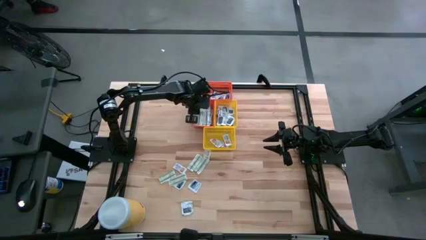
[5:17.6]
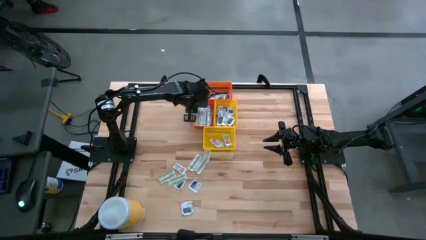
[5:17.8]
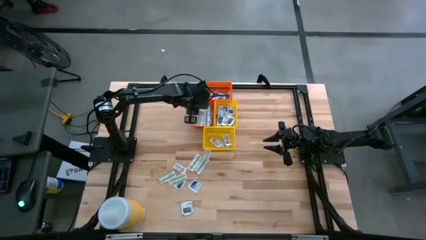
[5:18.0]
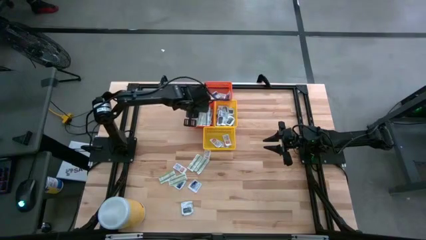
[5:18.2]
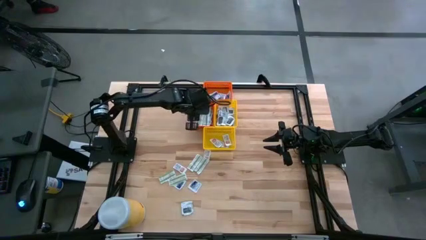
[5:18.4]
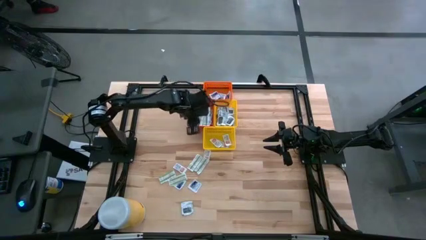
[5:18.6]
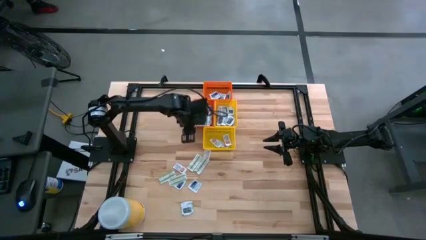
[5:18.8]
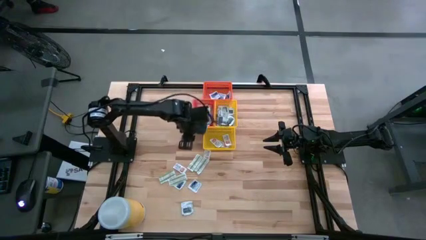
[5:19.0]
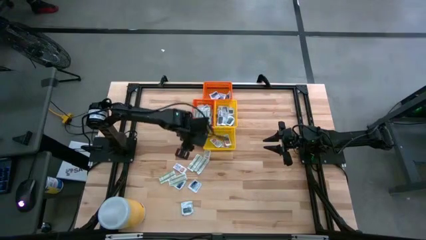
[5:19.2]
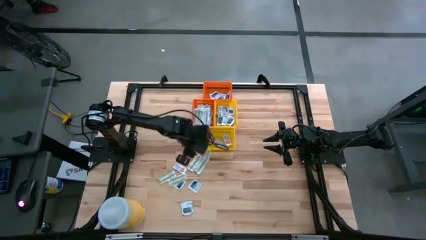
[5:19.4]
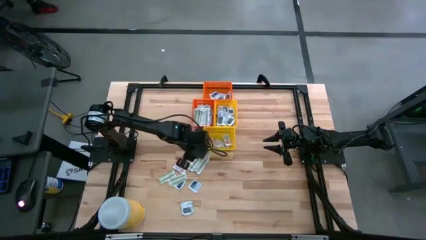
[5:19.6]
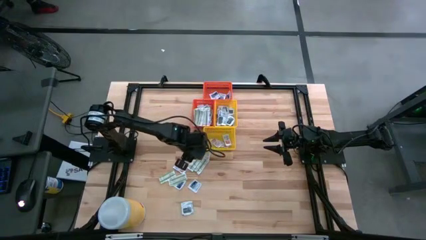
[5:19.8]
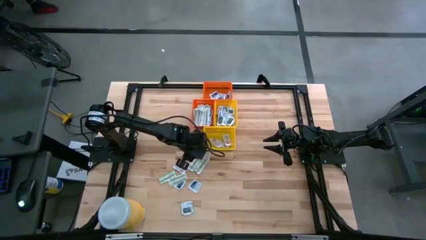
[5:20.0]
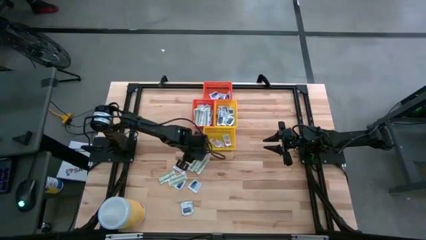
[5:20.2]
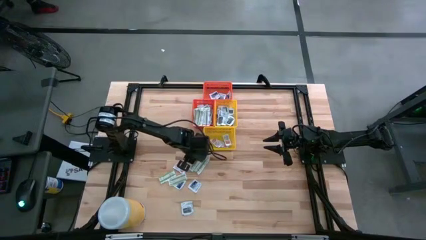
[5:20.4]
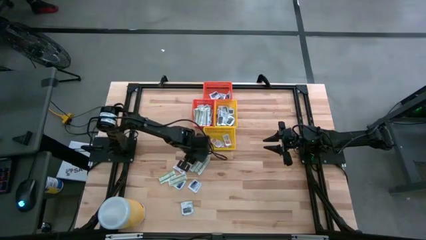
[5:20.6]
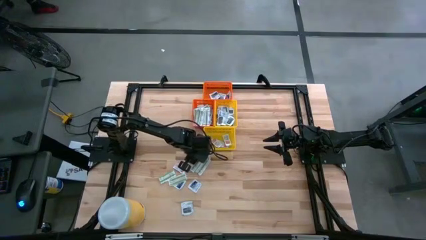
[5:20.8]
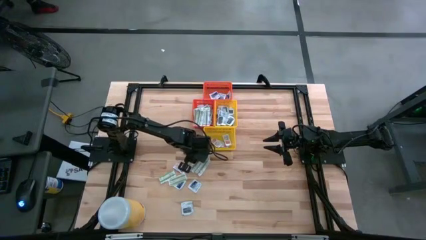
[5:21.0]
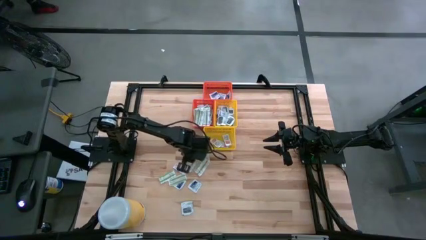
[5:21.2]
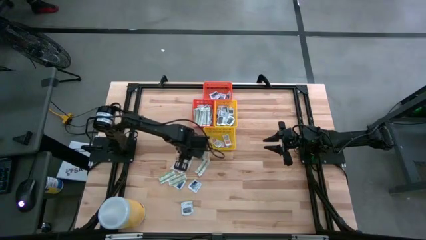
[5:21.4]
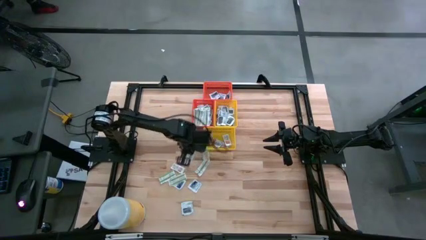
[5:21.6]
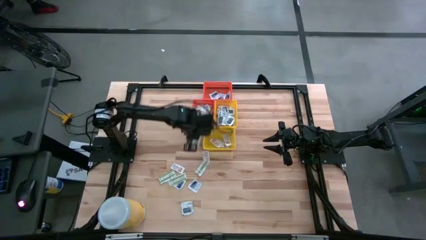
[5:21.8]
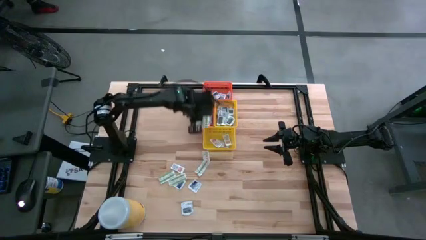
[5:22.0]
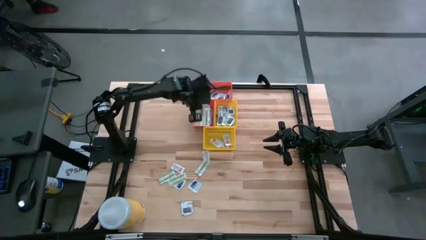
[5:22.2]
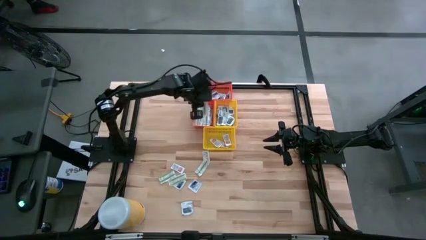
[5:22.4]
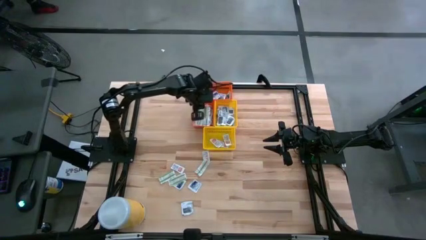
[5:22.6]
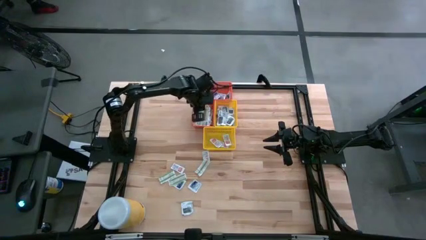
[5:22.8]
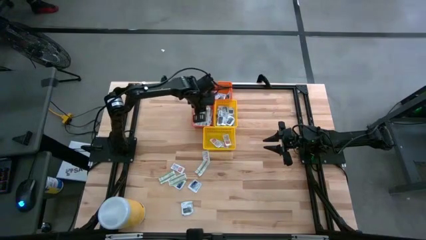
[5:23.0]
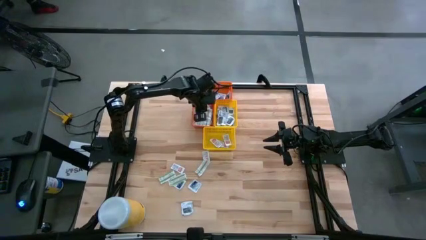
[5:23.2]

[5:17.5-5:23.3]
Task: Pick & Place First Aid Supplies
Put the bandage into the bottom orange bin

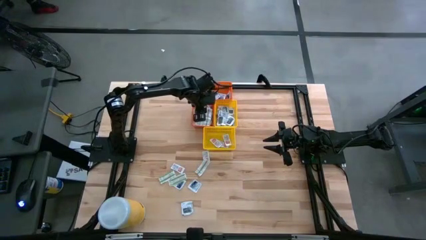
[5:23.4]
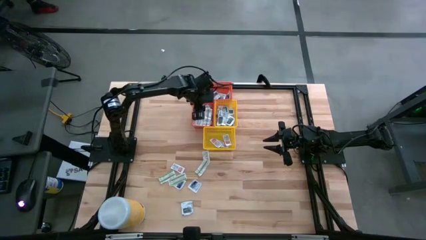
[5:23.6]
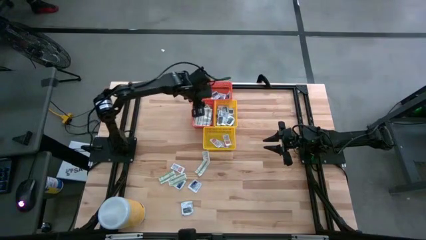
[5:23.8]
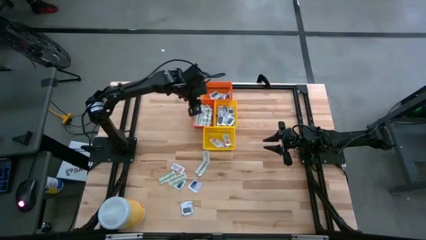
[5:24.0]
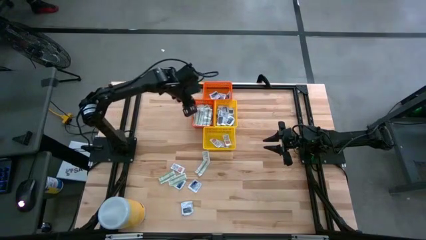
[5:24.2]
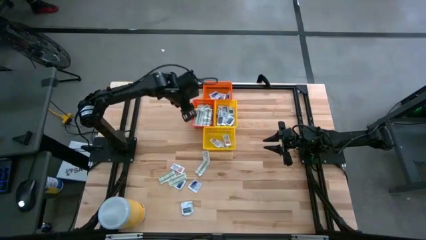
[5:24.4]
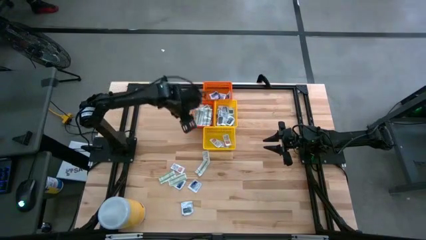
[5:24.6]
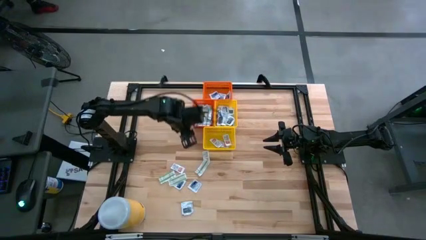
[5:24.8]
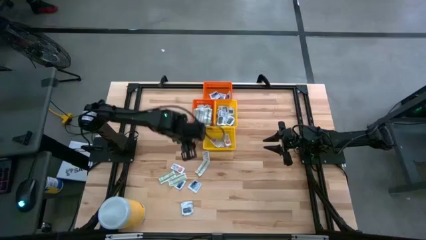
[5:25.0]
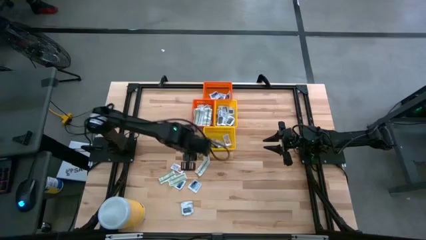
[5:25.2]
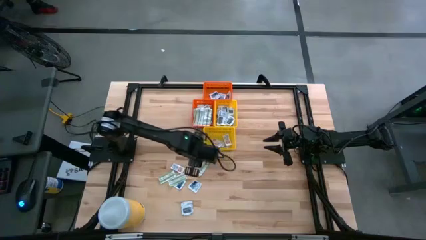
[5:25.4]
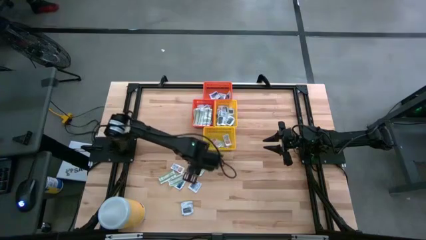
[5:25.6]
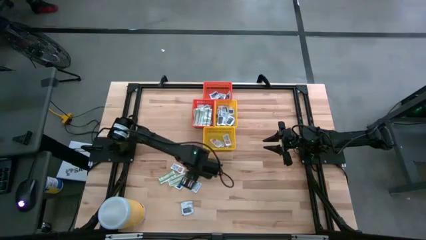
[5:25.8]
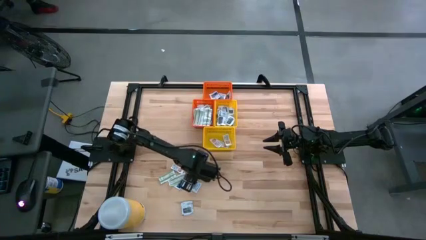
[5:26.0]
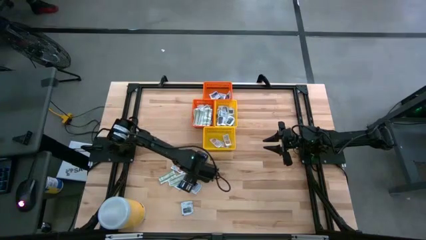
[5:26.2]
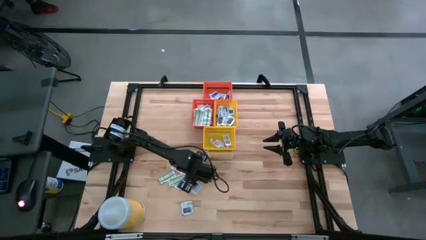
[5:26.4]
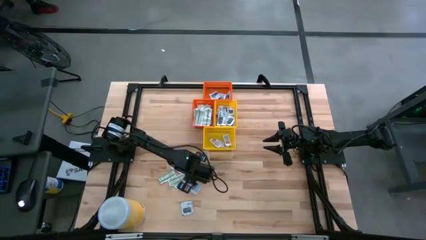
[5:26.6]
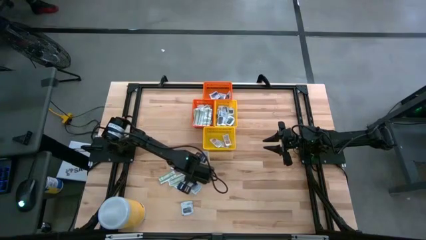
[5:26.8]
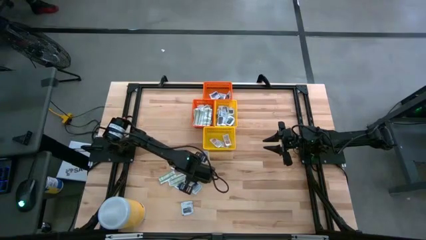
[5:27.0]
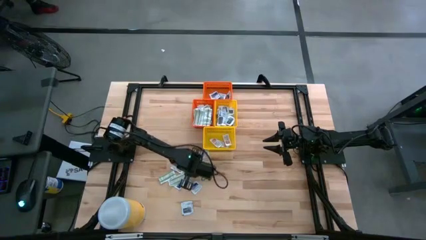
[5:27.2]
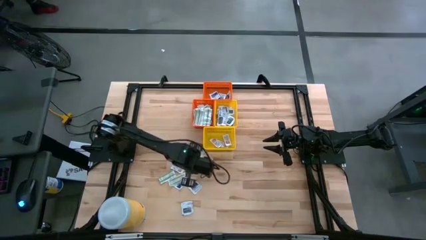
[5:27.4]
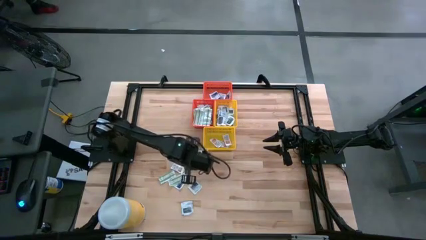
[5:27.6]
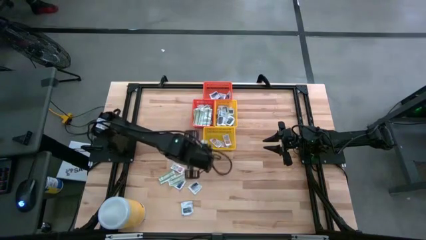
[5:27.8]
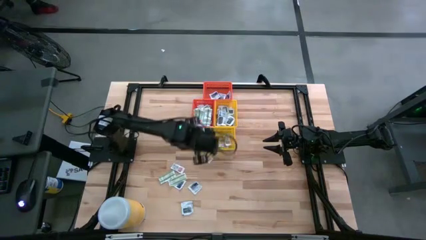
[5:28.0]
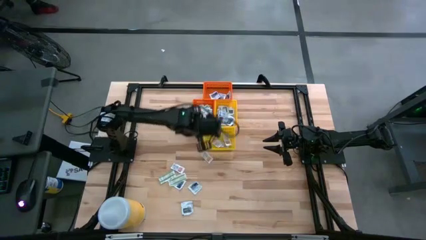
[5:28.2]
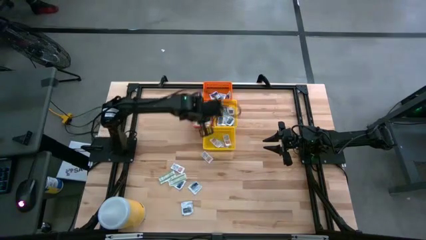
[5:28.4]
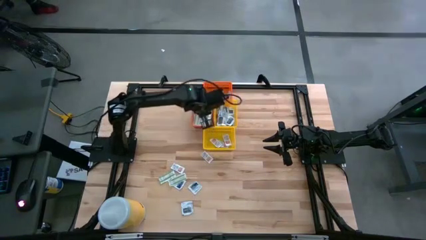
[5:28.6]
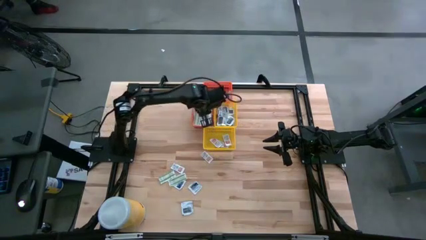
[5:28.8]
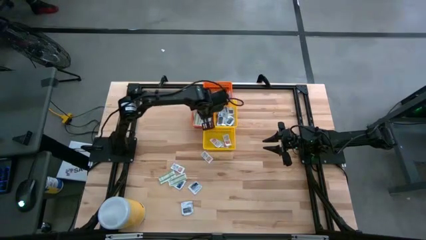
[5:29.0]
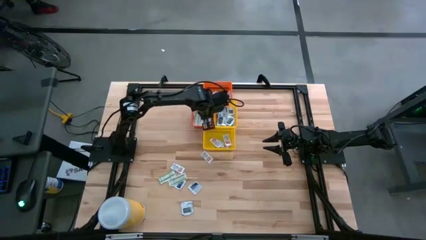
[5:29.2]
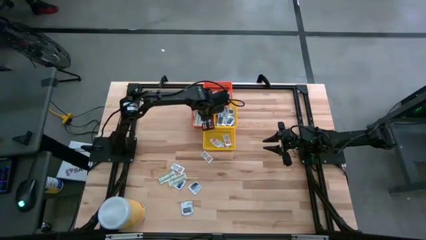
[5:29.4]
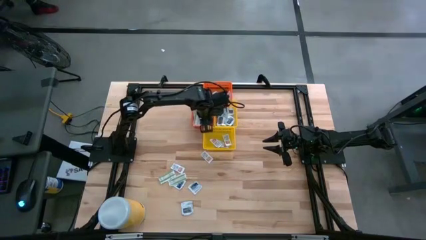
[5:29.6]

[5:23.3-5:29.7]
Put the bandage into the bottom orange bin

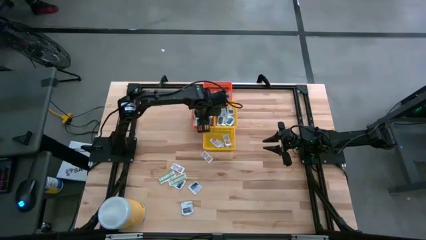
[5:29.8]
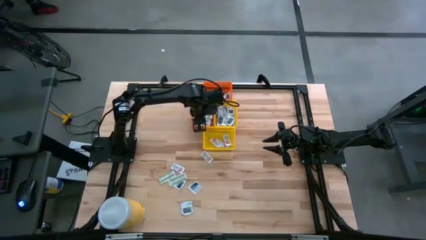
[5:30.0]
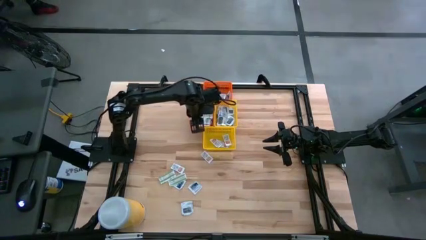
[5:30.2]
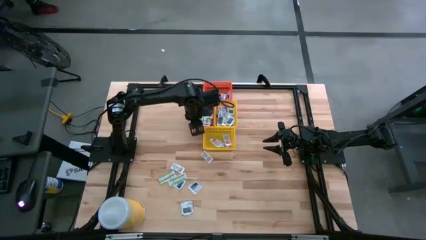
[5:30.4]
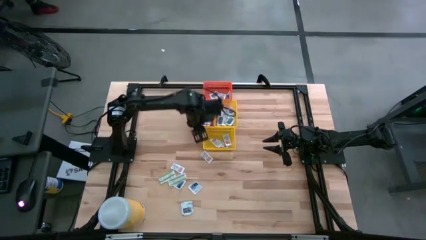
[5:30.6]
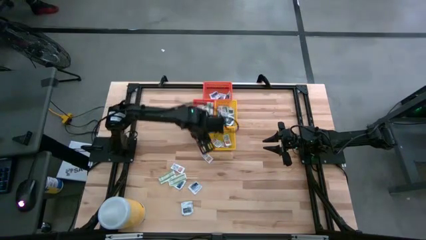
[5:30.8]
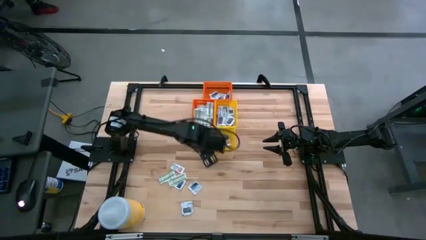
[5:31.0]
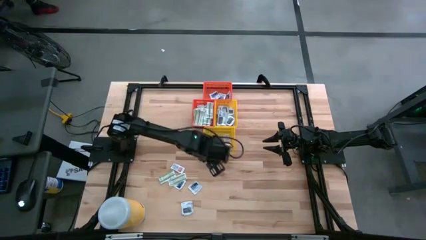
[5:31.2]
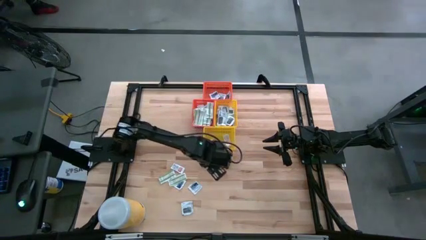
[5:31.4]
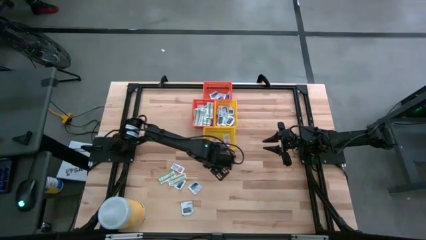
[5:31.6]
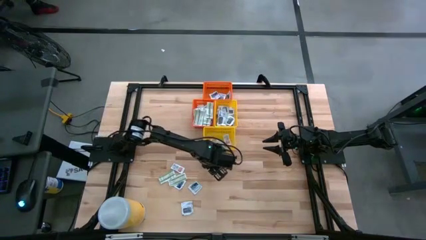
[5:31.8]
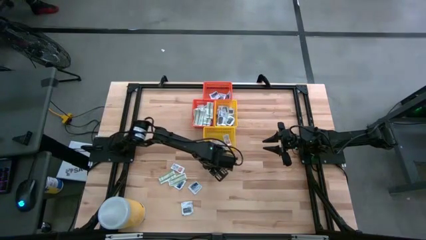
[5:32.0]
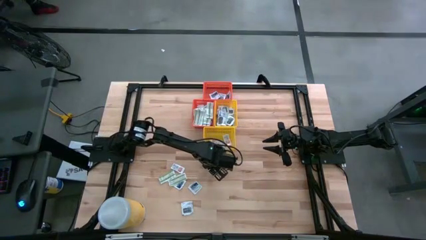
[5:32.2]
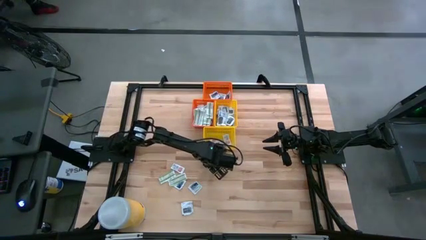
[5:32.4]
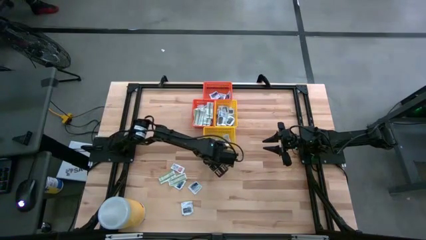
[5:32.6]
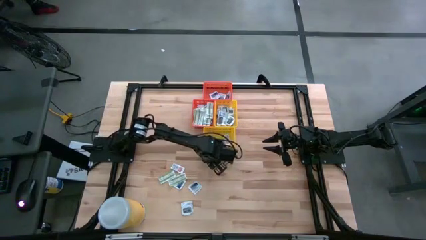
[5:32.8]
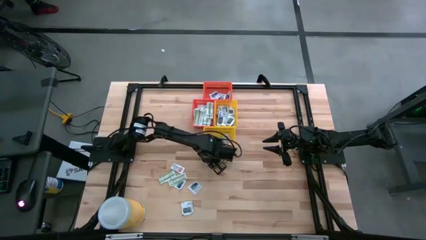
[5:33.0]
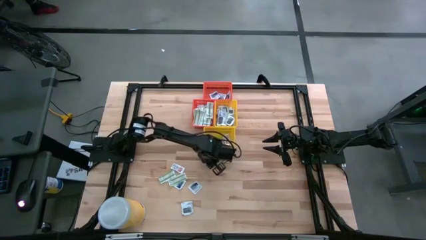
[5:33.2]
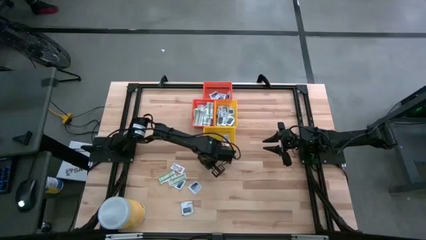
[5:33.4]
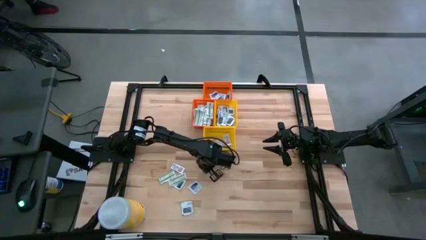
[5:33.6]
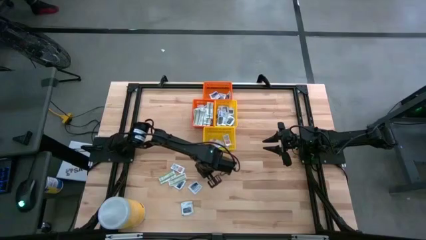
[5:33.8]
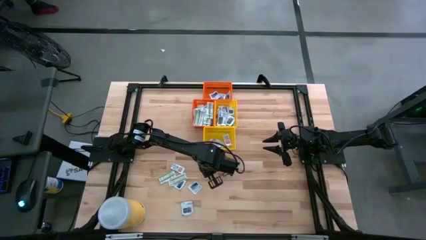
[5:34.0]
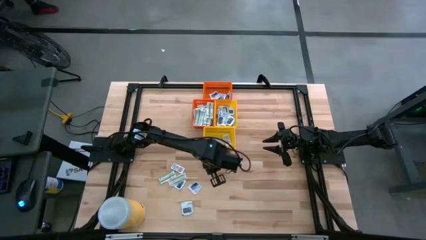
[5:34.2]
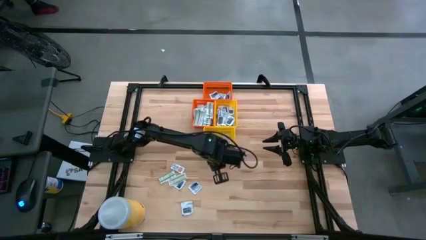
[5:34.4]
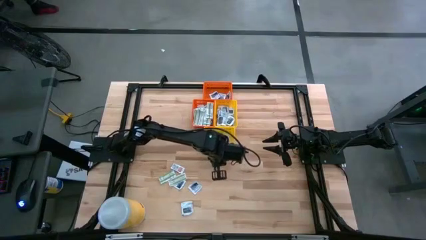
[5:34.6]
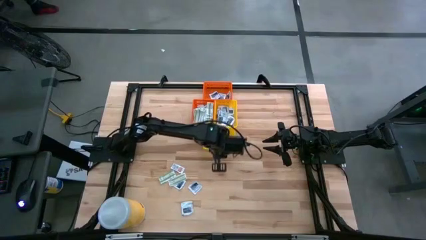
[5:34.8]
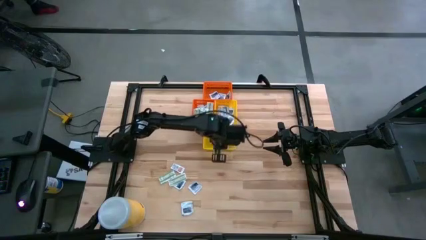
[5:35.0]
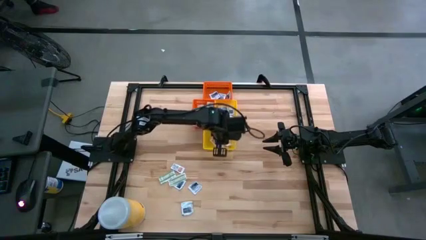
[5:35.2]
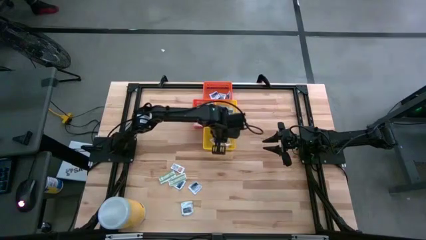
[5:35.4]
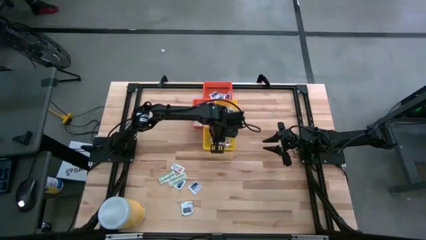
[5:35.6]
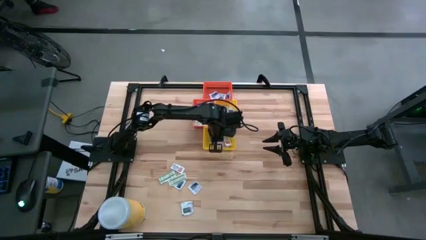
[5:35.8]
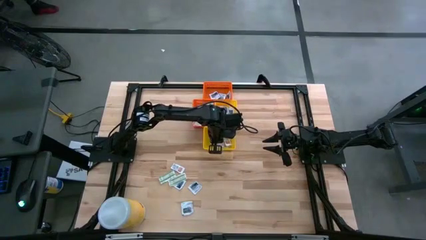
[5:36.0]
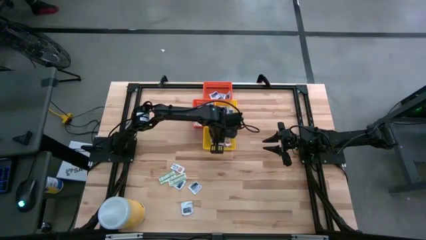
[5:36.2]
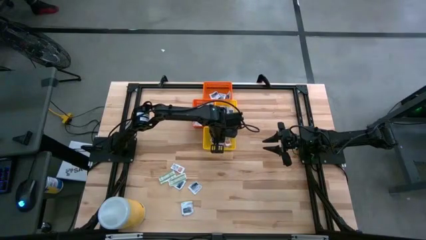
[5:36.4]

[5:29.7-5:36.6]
Put the ointment pack into the bottom yellow bin
